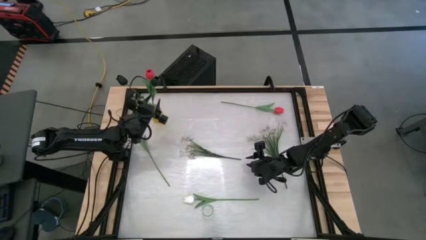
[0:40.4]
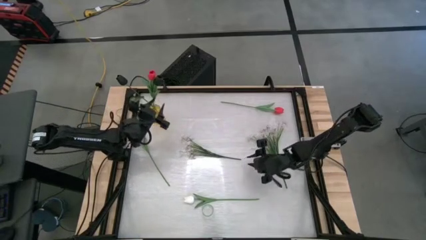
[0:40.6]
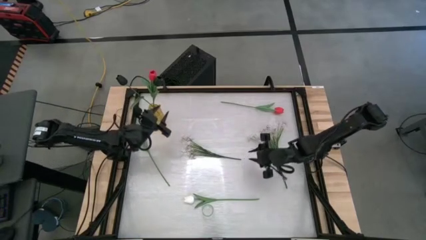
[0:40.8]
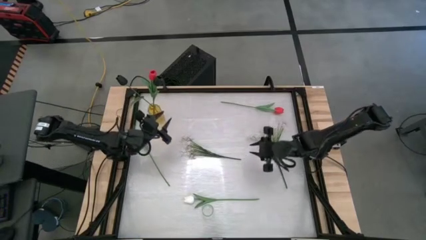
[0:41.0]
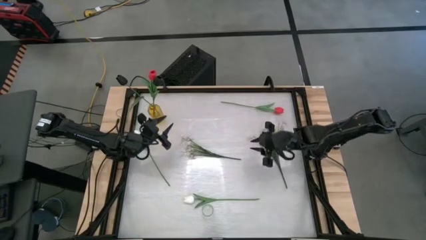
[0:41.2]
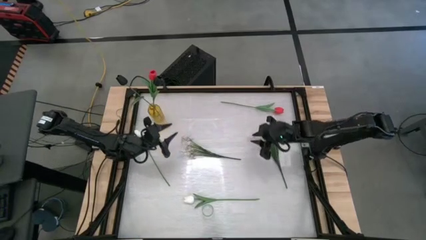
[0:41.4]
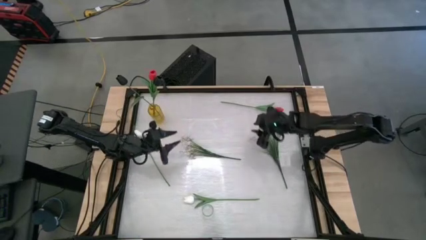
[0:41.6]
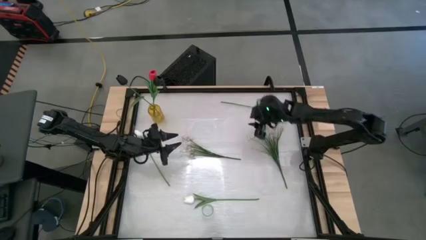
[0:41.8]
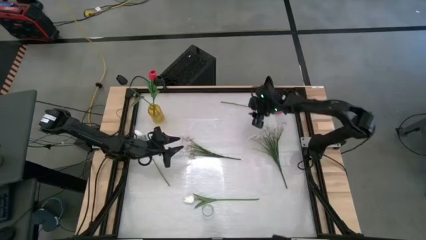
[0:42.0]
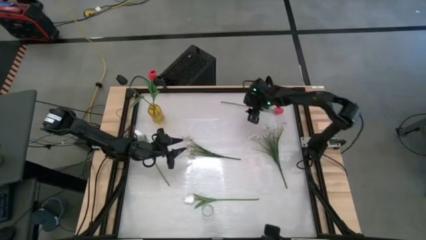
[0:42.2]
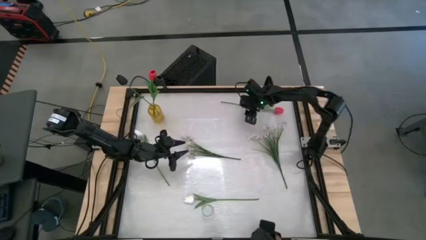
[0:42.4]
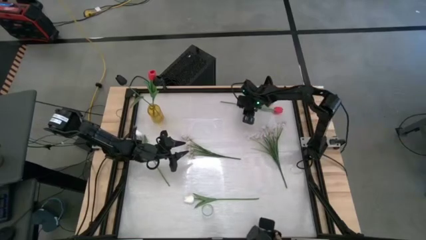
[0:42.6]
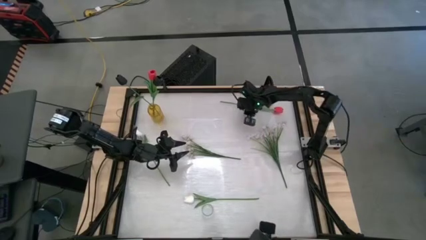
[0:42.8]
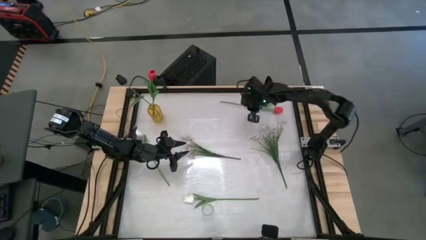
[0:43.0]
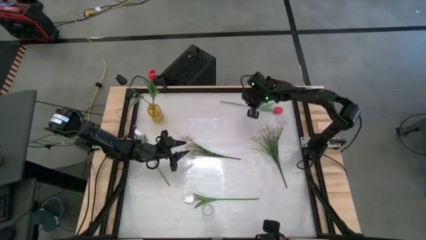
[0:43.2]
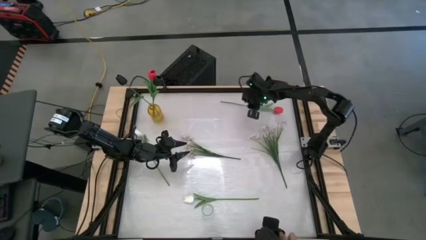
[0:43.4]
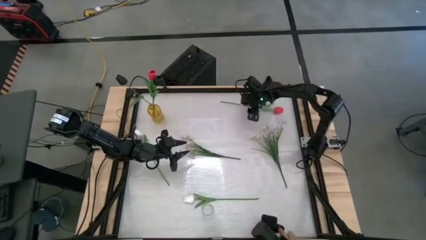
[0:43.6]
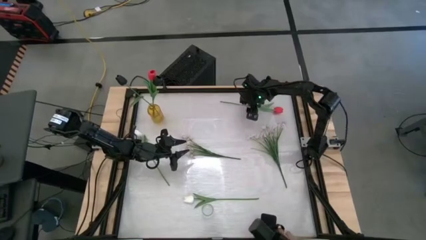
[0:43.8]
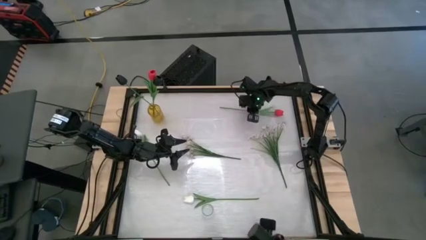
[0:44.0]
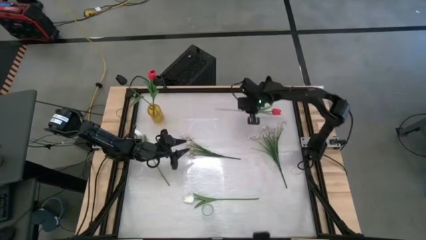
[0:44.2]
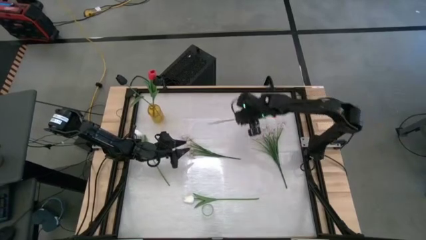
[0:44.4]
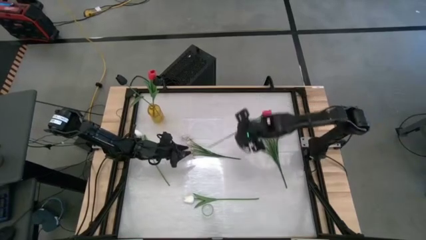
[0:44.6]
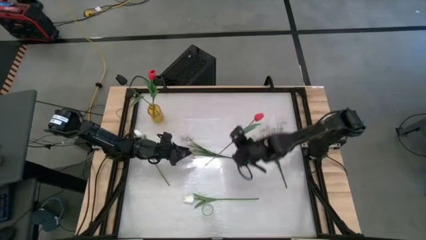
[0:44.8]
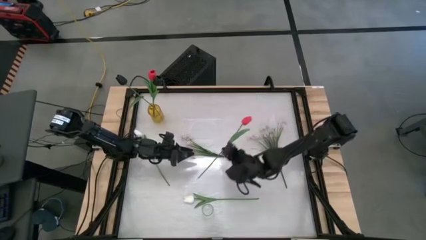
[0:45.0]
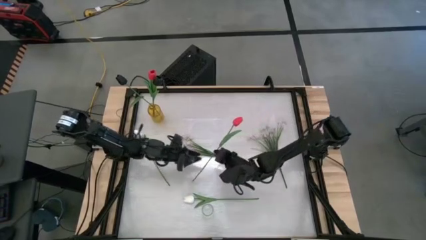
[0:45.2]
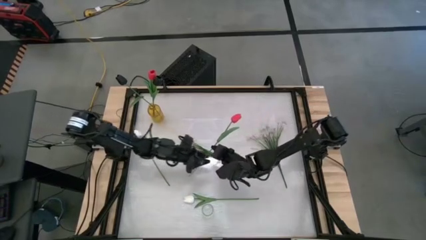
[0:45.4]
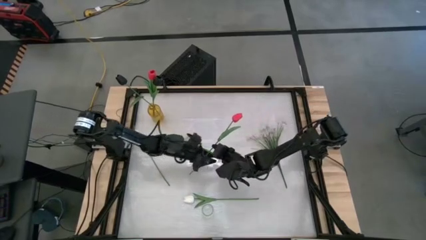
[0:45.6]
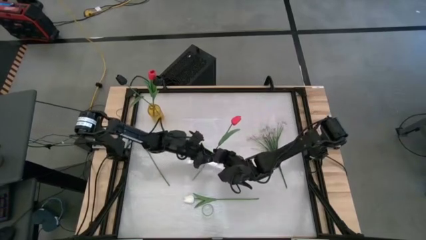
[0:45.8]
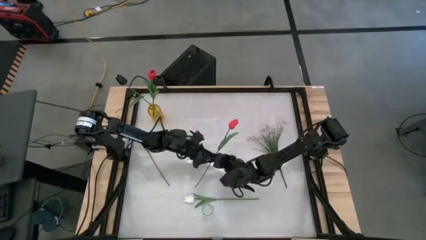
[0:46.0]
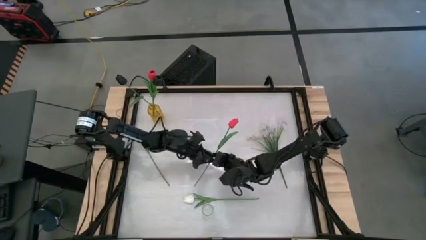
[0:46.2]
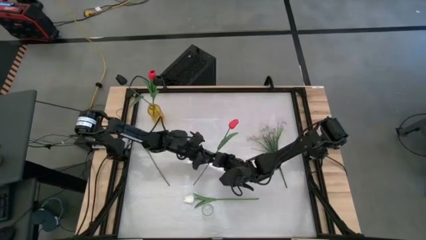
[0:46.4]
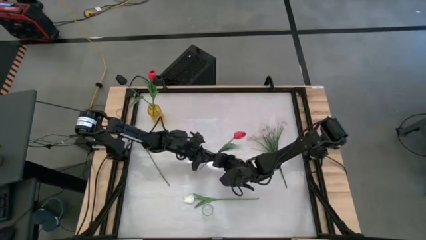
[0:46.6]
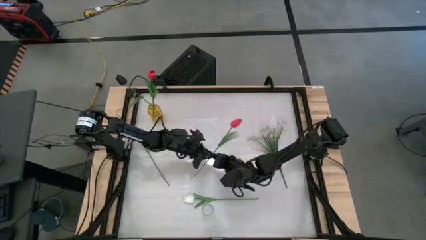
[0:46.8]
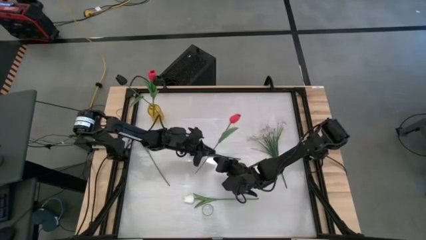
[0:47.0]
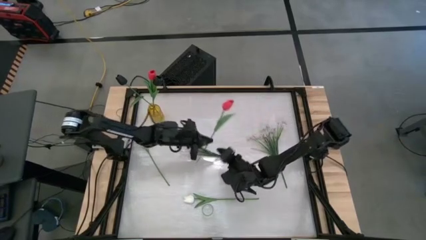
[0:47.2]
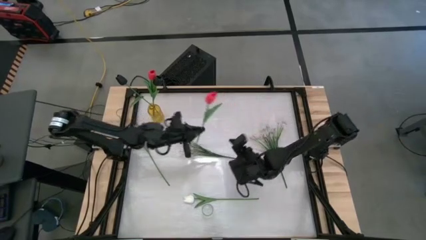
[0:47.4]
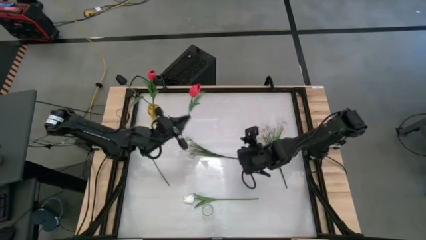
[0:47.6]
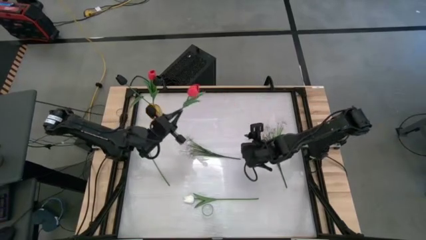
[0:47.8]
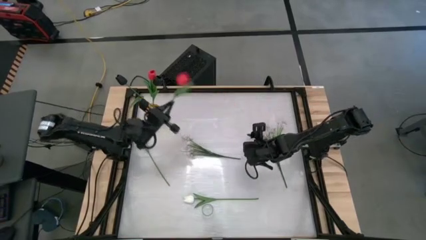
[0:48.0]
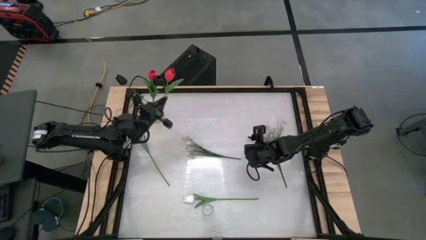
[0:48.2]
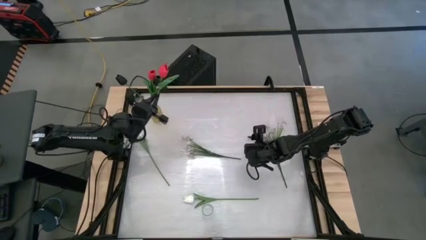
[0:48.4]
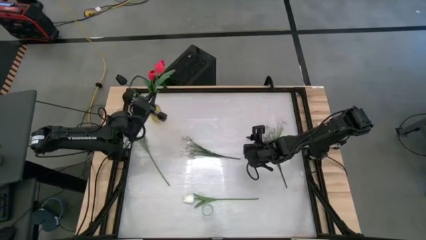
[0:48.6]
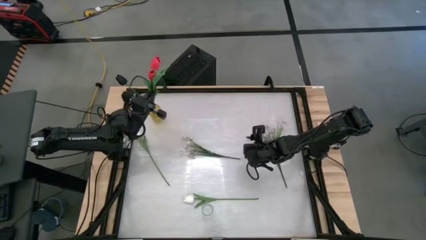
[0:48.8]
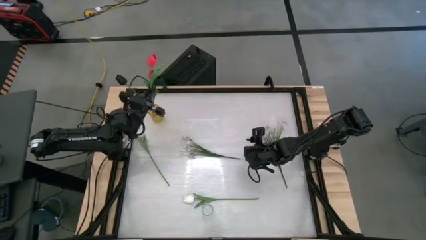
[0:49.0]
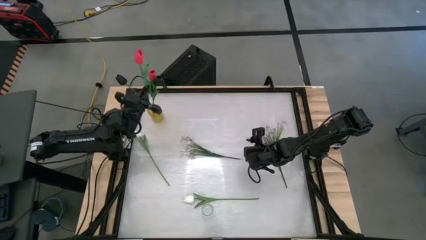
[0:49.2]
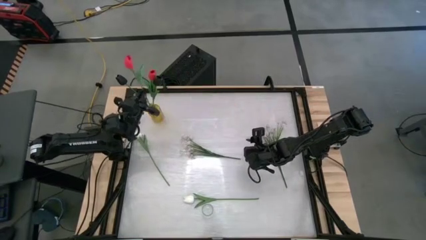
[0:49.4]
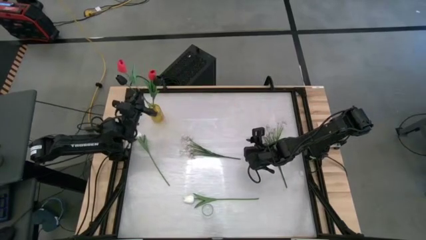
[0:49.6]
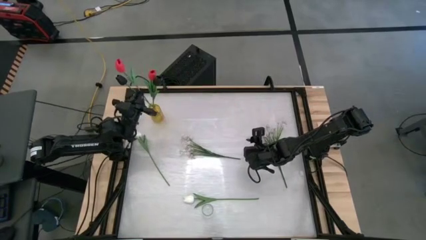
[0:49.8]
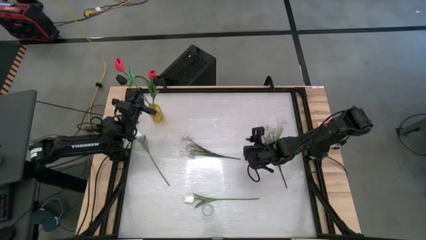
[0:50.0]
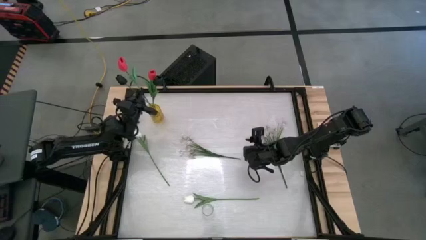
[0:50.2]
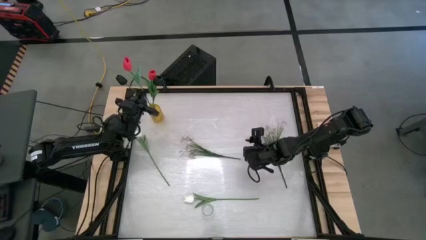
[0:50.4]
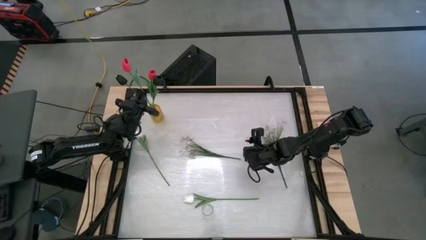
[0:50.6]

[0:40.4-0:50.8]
Task: Sort flowers into vase by color
Put the red tulip into the yellow vase

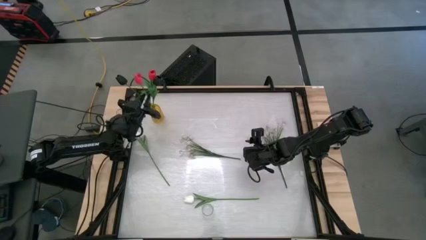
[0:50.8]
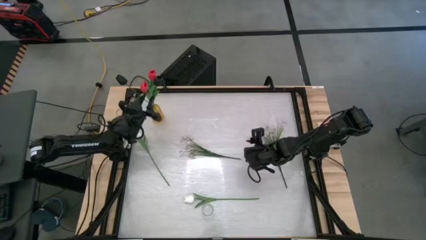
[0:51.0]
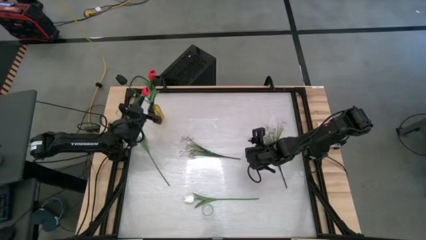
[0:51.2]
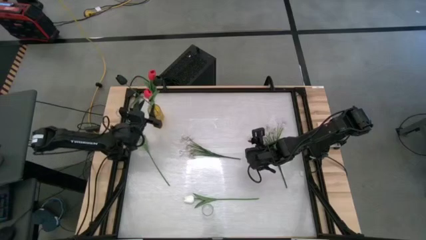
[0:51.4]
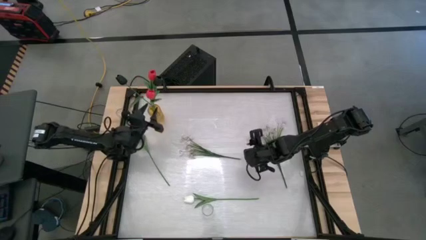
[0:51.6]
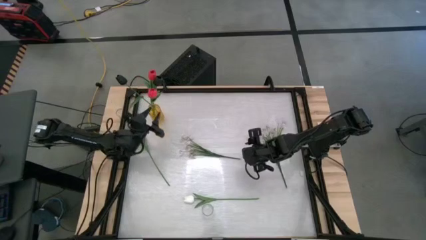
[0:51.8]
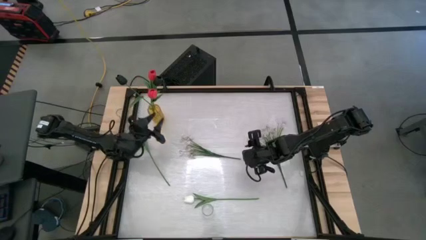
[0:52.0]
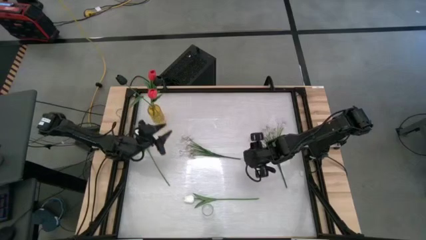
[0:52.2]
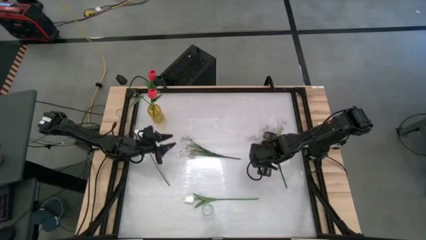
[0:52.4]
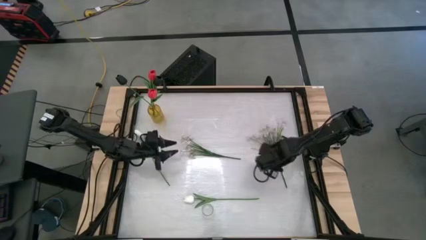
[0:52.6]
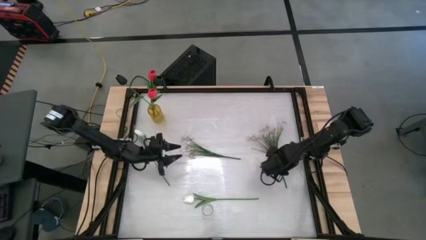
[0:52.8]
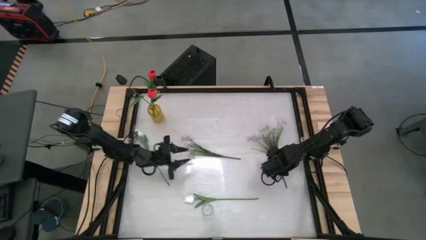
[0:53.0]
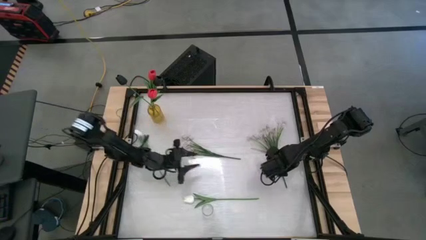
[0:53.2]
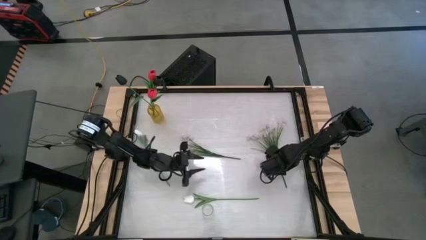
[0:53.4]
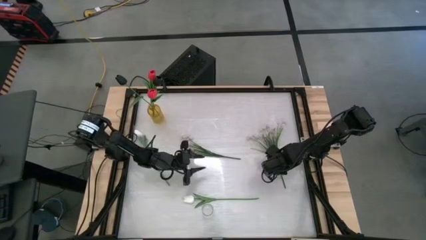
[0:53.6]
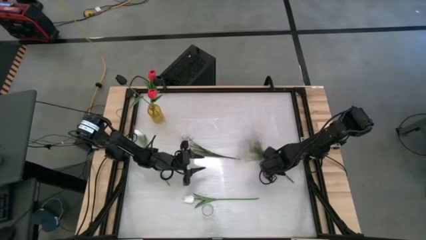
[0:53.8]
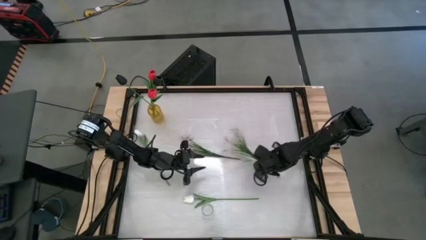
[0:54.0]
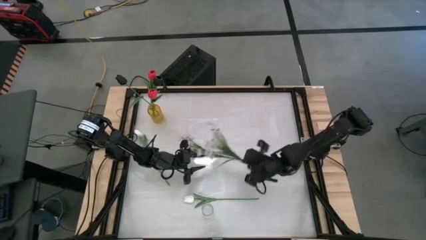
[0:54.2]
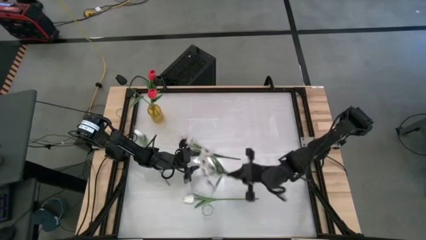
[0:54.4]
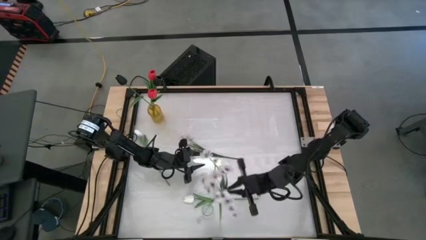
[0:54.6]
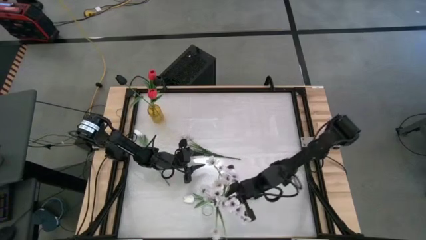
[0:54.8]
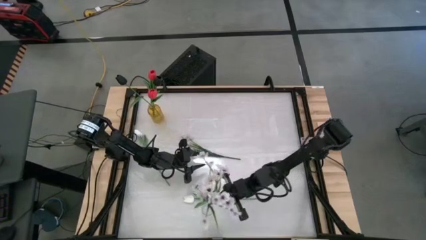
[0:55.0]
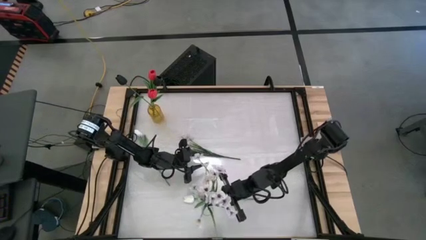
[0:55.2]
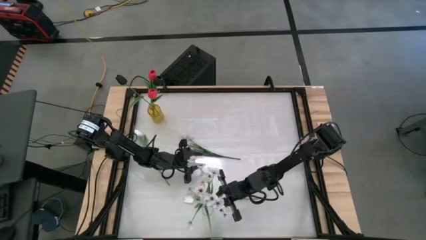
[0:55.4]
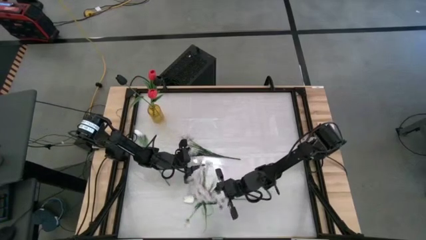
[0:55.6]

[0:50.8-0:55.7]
Put the right white flowers into the transparent vase
